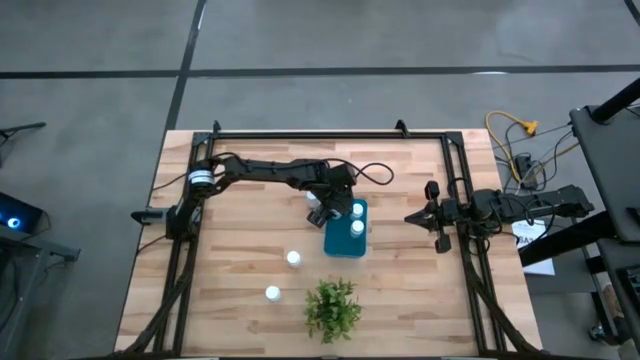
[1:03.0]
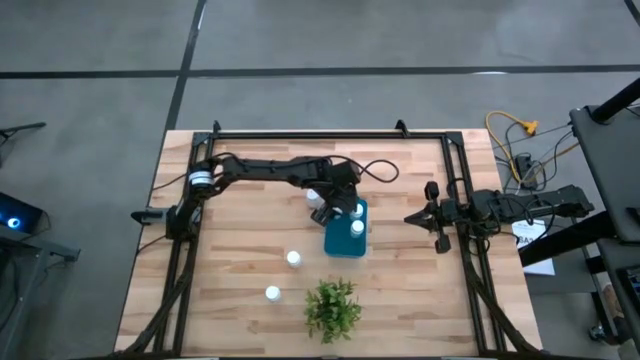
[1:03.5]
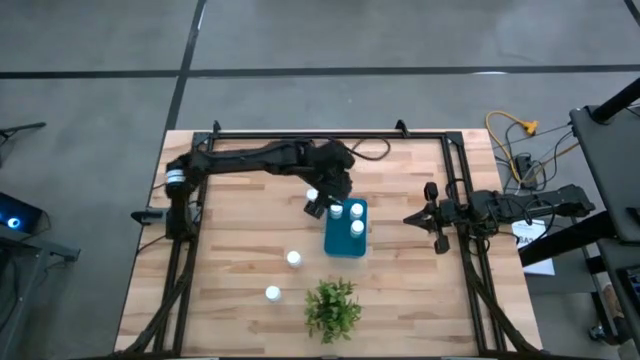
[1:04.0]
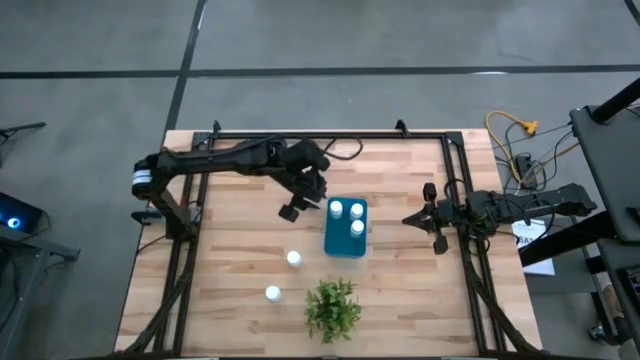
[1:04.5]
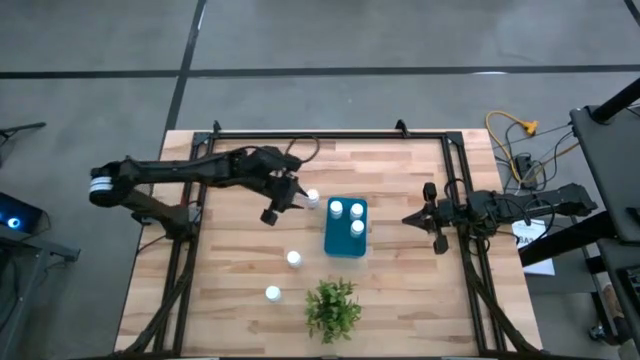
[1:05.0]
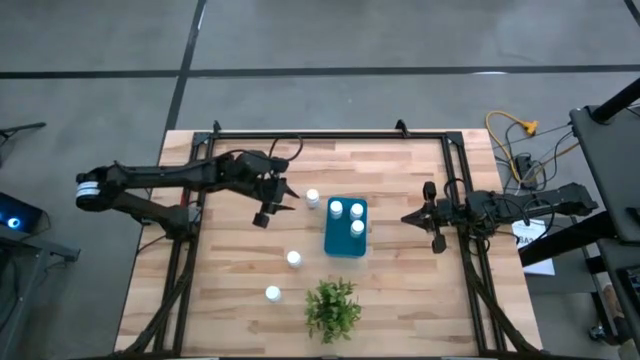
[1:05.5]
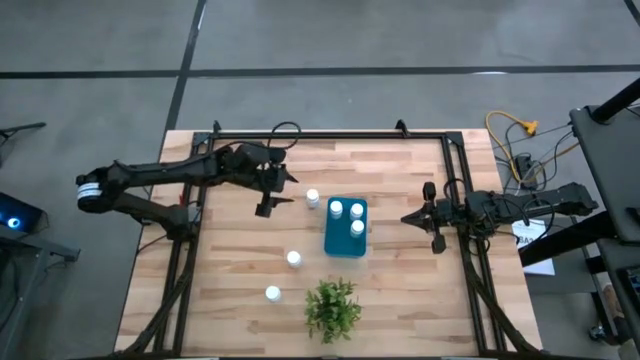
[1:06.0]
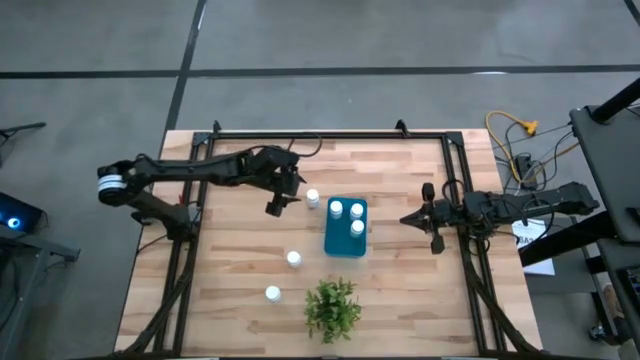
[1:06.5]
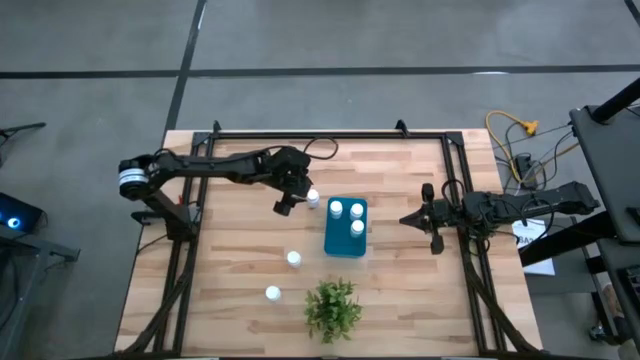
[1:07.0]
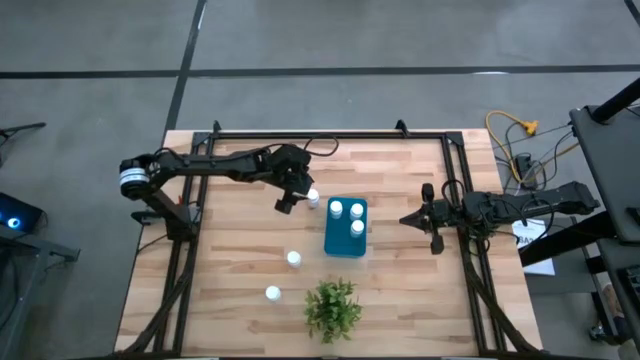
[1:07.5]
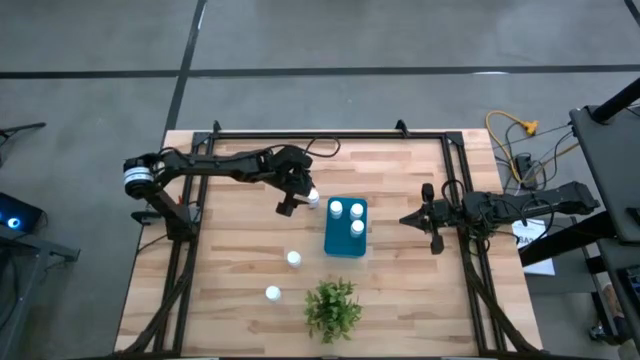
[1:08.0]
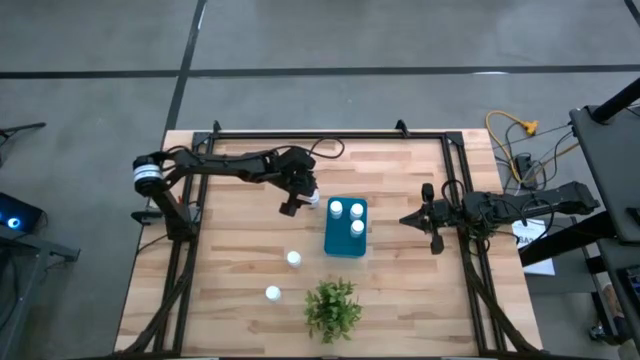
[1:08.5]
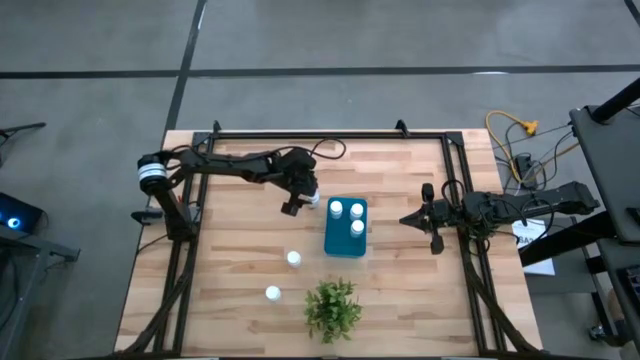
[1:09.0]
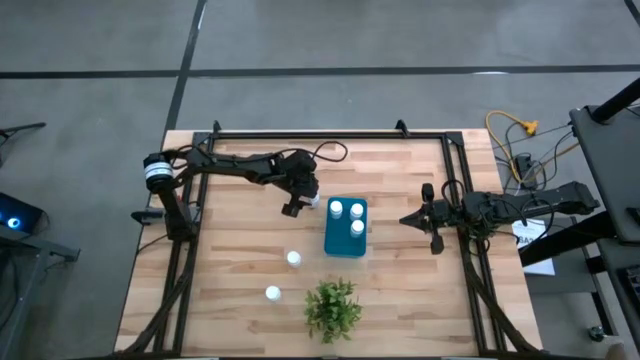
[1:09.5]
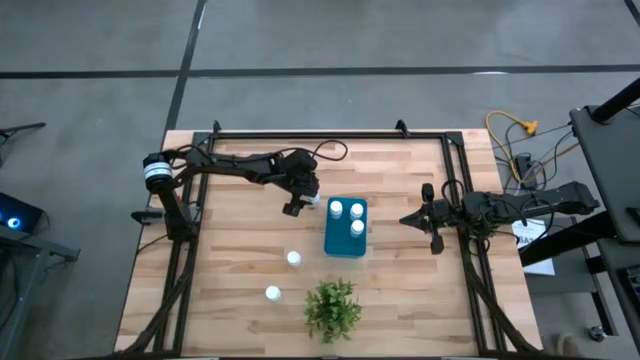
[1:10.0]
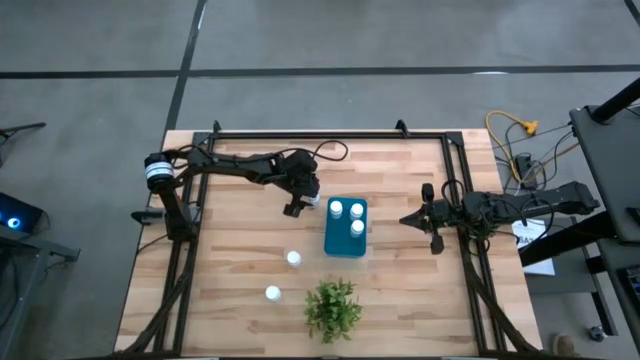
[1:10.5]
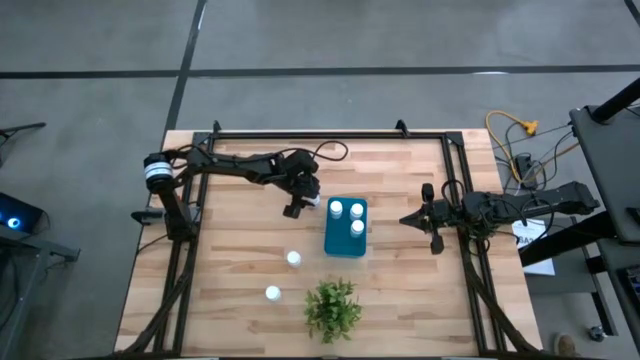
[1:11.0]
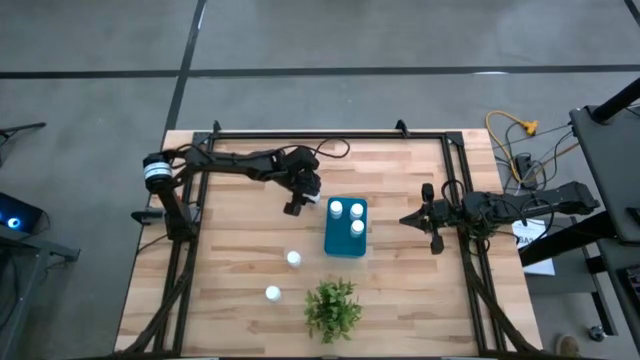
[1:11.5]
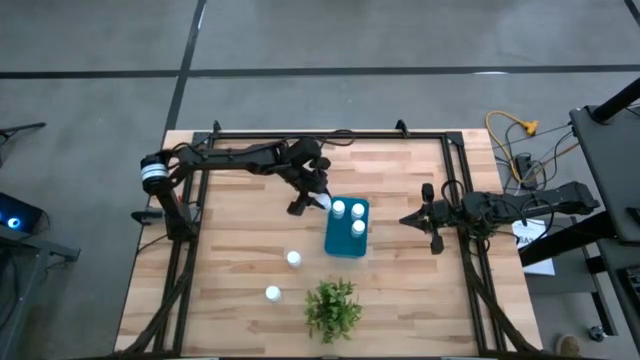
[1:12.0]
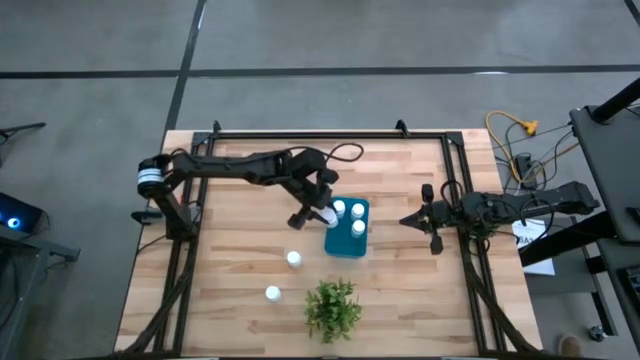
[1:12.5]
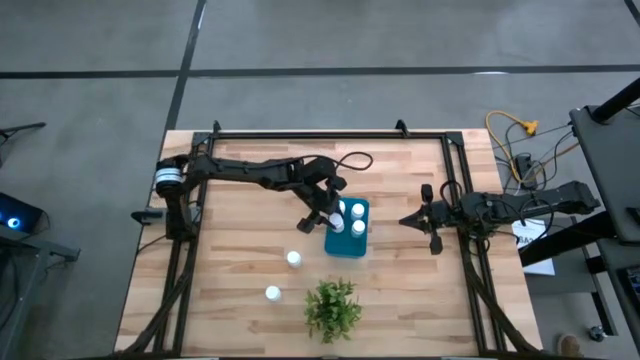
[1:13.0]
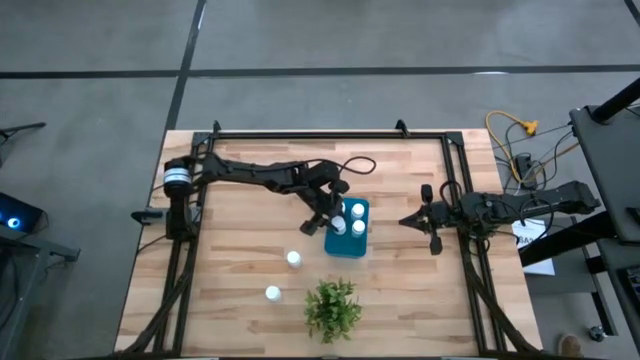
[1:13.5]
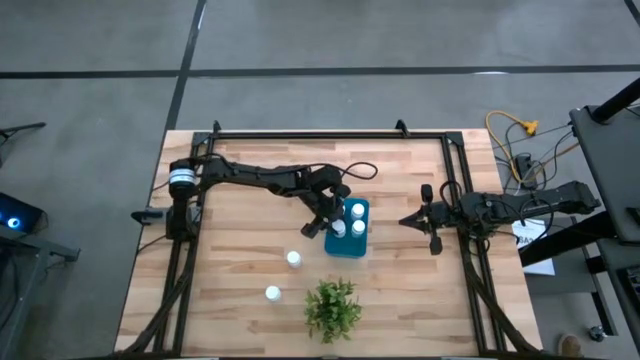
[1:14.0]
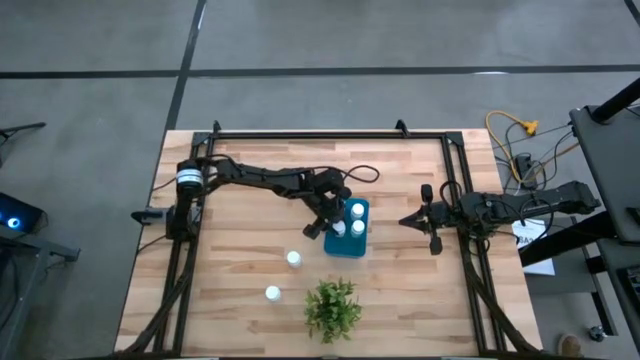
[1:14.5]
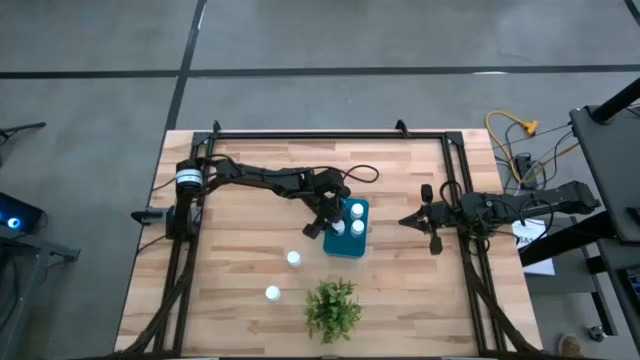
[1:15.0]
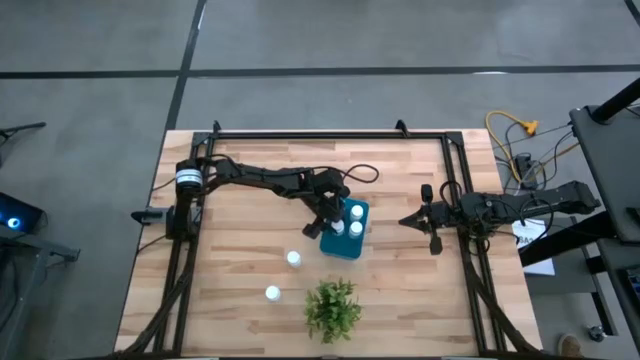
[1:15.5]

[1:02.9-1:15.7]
Task: Pick and place pill bottles into a basket
Put the white pill bottle into the blue bin

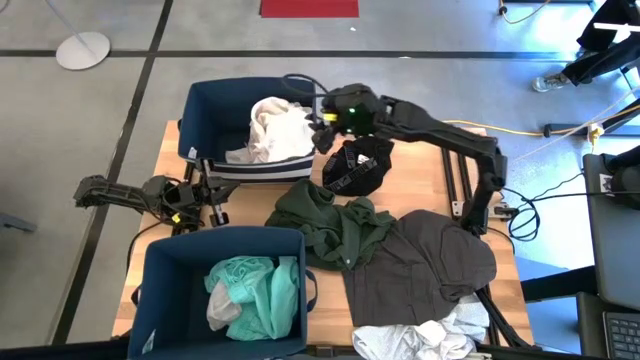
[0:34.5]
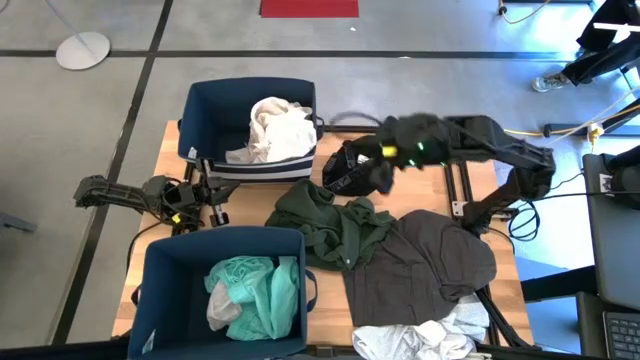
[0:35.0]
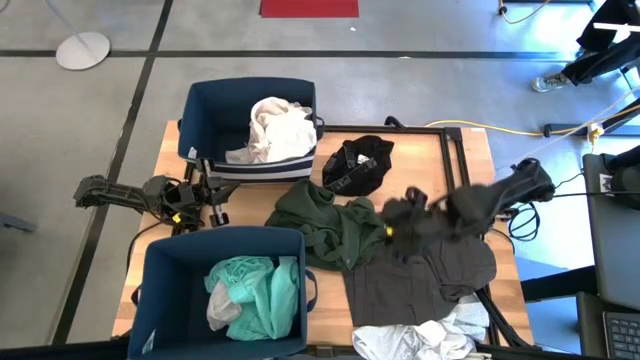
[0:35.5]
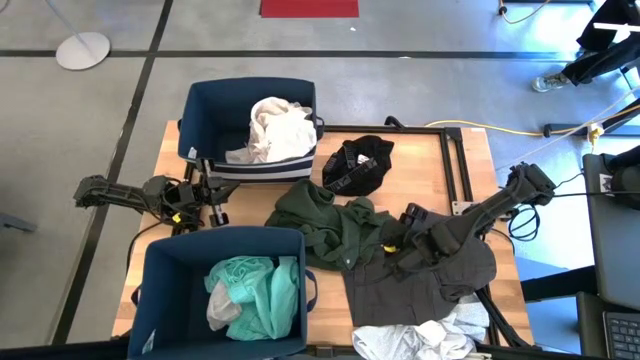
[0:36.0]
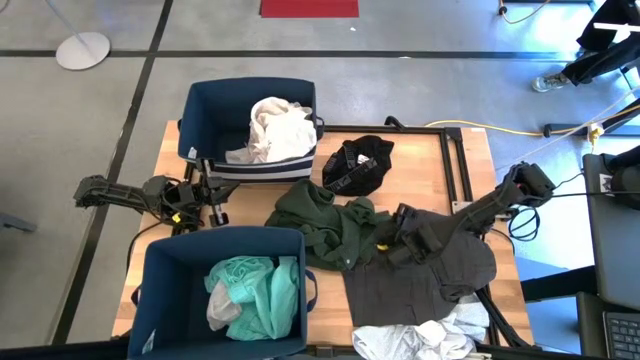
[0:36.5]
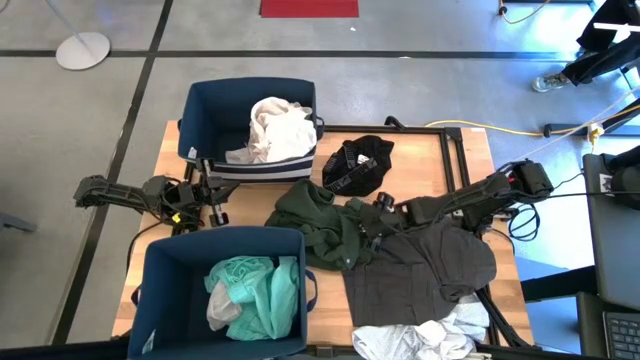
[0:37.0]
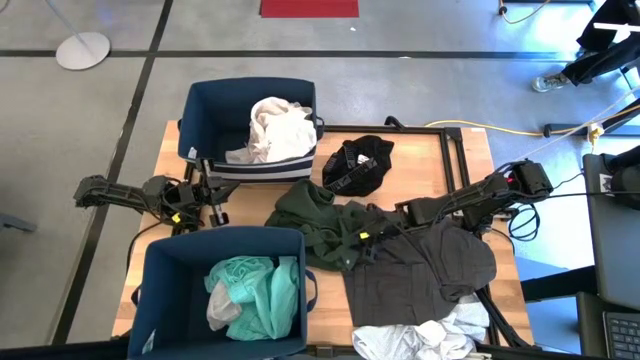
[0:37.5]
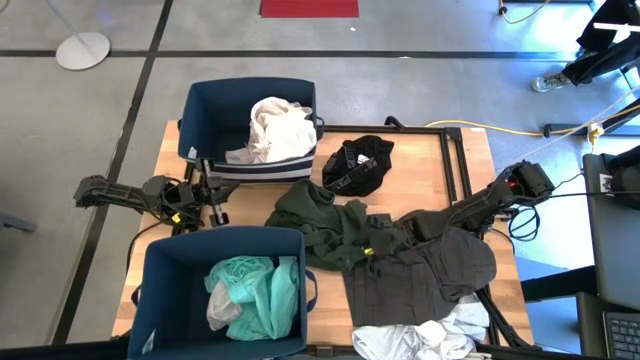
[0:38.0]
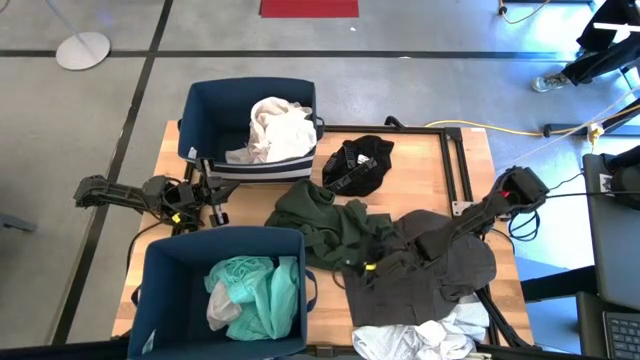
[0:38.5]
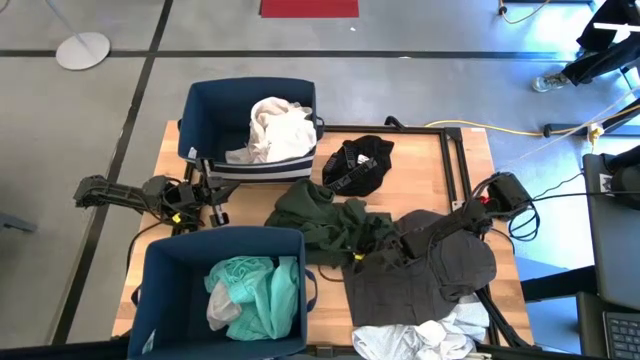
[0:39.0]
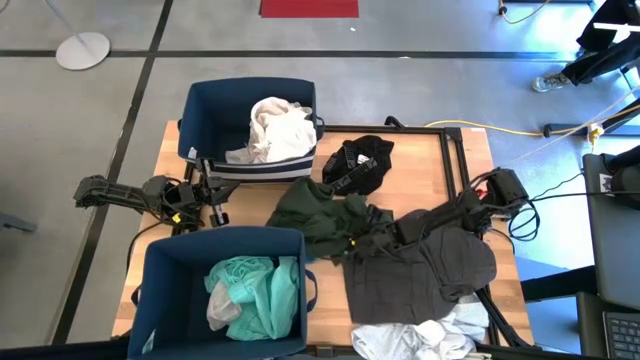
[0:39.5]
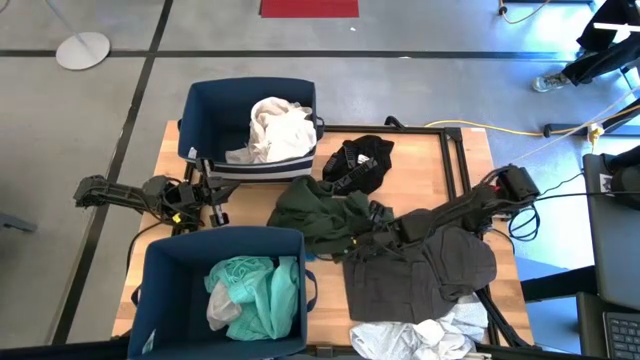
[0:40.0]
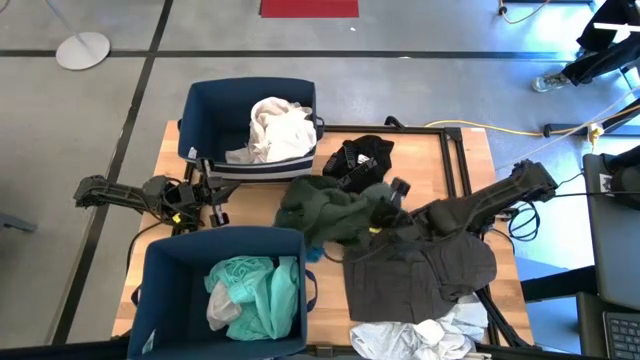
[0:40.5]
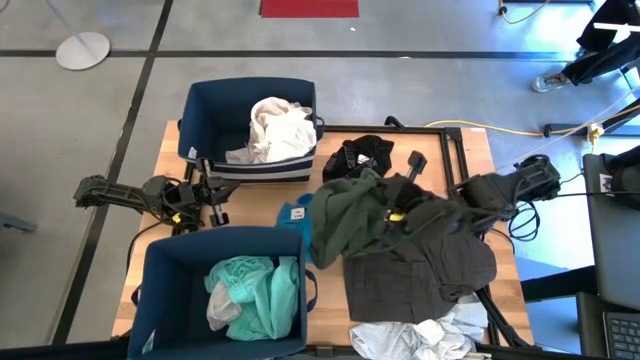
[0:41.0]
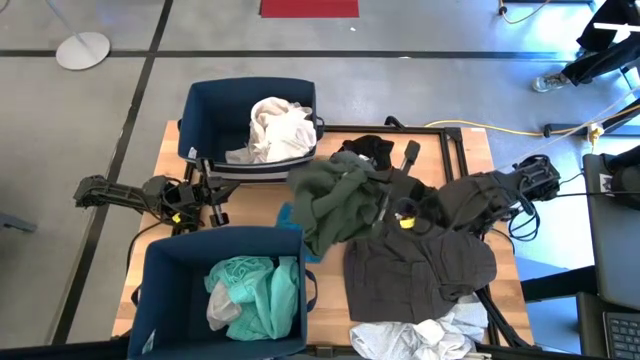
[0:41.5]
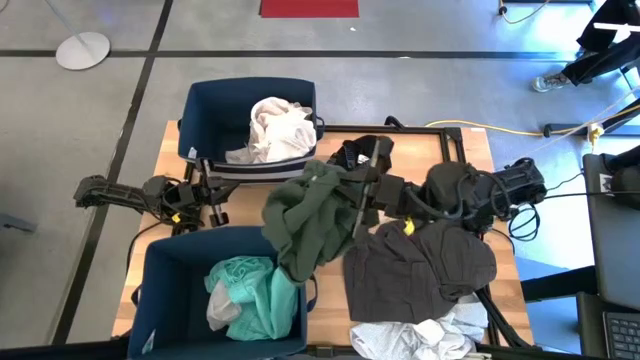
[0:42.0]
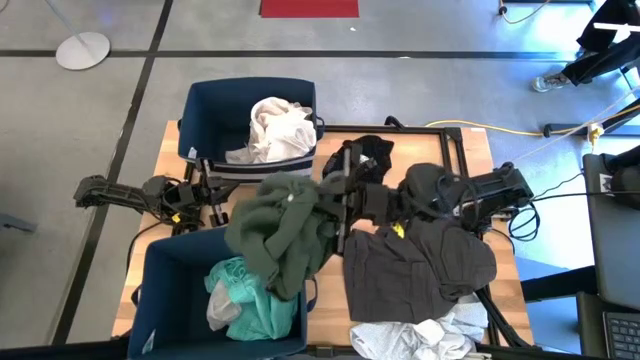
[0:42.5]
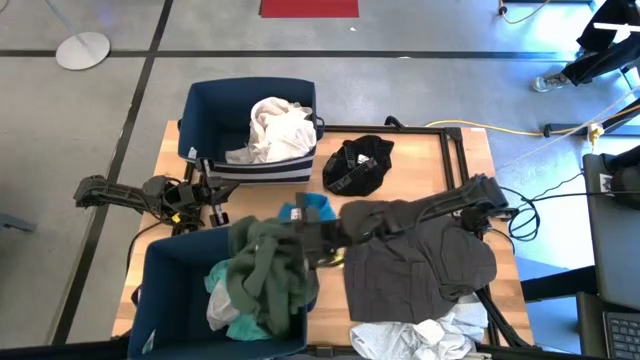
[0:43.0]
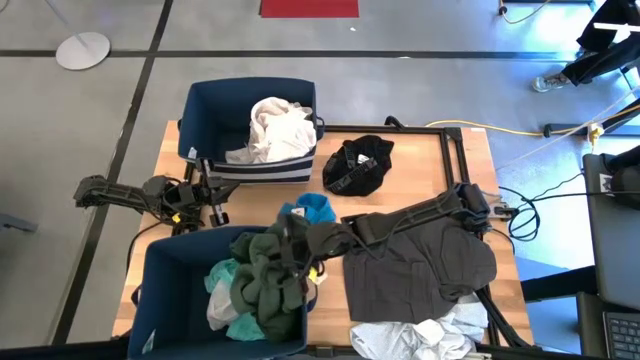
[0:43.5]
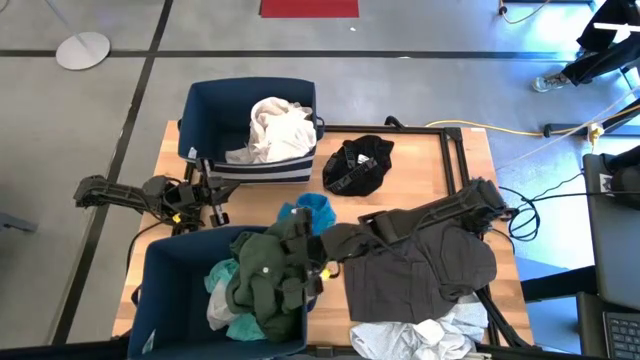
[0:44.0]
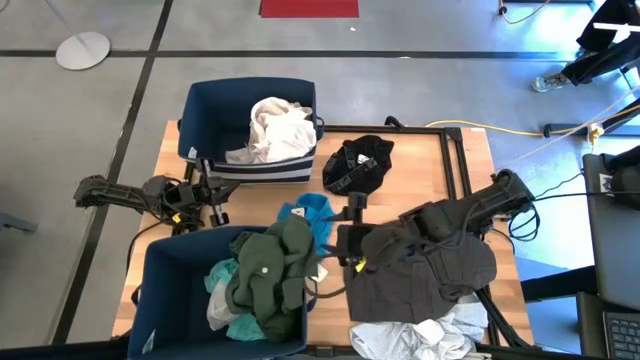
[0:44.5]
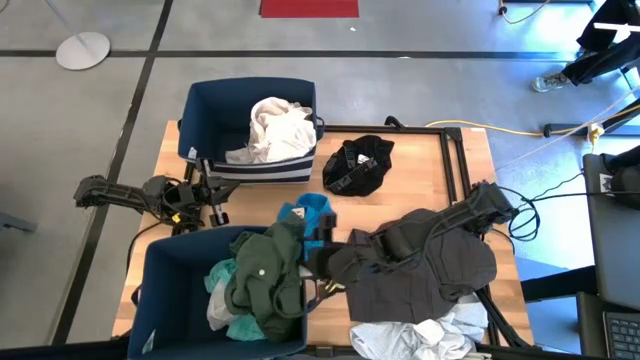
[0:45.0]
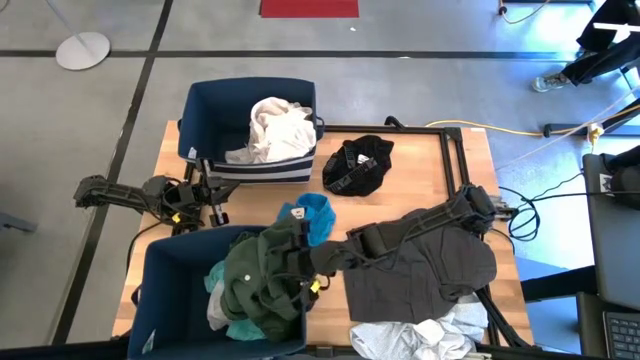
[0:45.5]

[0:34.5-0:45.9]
Task: Sort clothes
Put the dark green polo shirt into the bottom blue laundry bin
